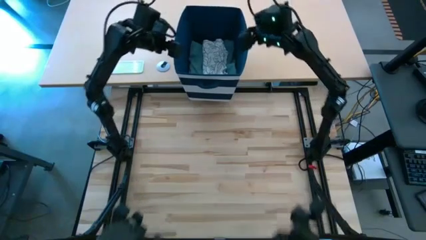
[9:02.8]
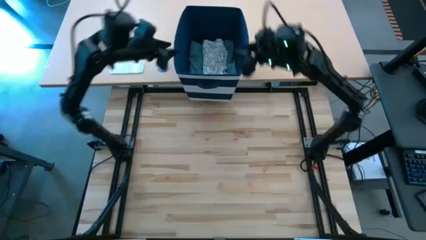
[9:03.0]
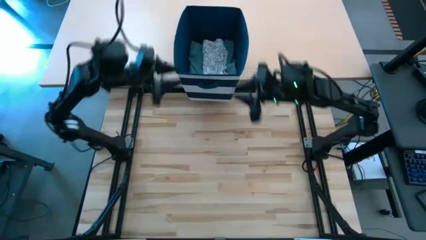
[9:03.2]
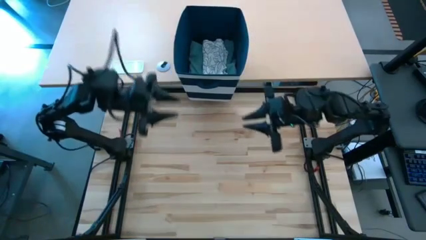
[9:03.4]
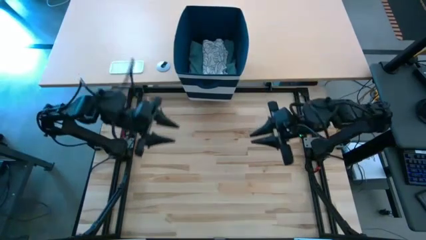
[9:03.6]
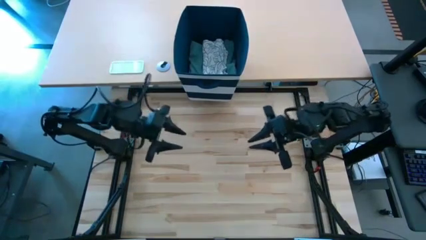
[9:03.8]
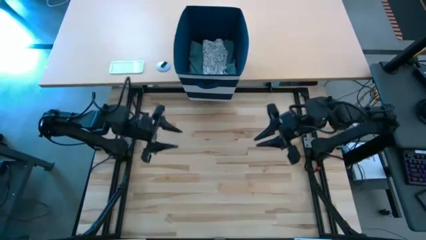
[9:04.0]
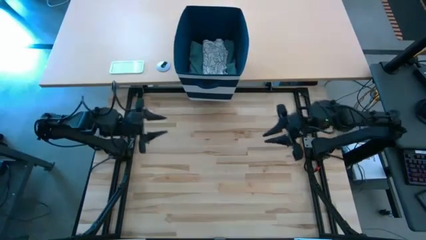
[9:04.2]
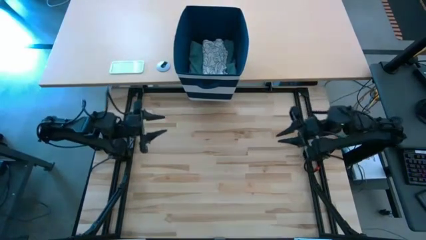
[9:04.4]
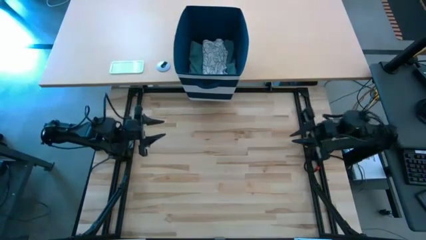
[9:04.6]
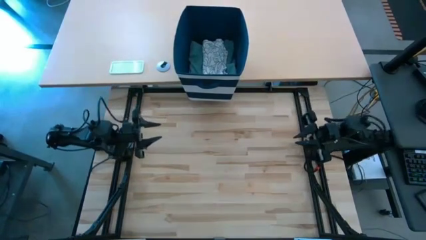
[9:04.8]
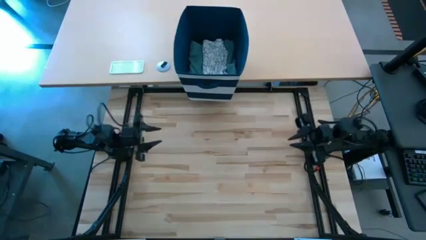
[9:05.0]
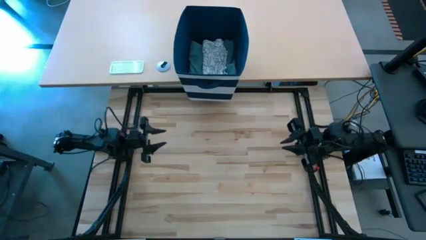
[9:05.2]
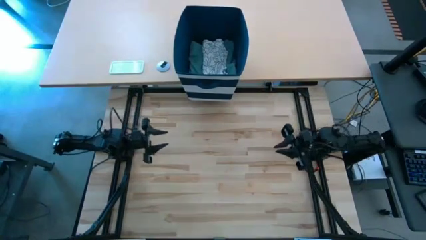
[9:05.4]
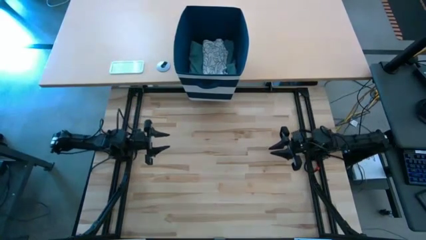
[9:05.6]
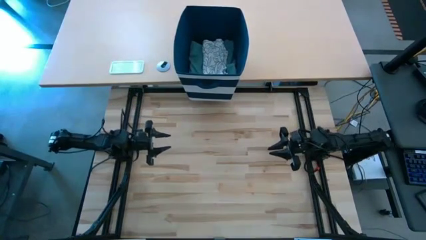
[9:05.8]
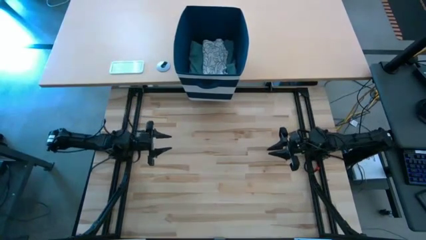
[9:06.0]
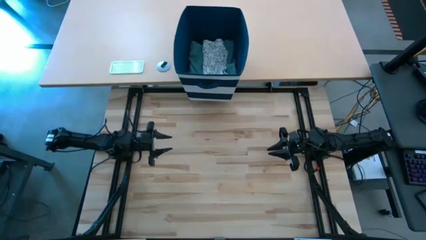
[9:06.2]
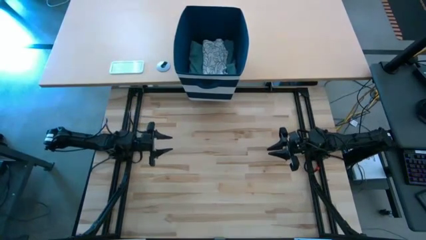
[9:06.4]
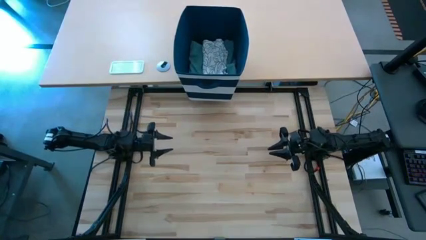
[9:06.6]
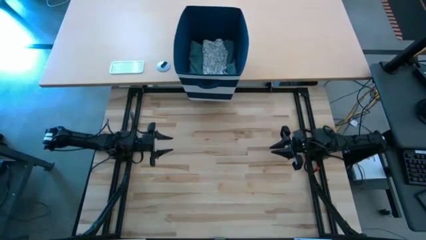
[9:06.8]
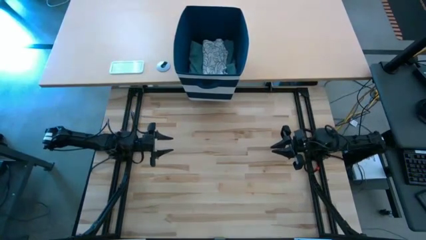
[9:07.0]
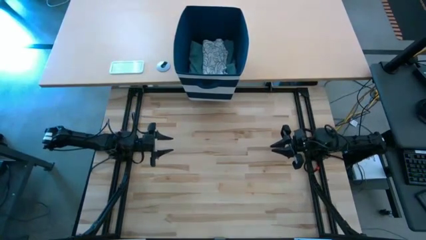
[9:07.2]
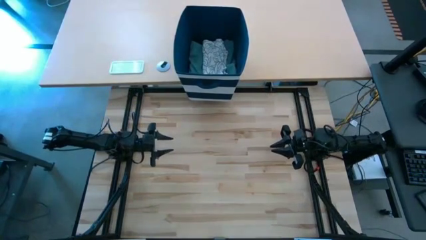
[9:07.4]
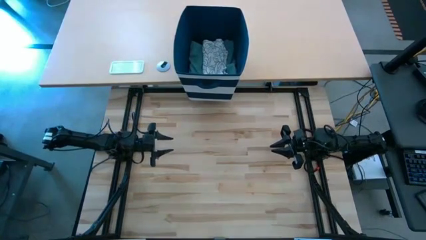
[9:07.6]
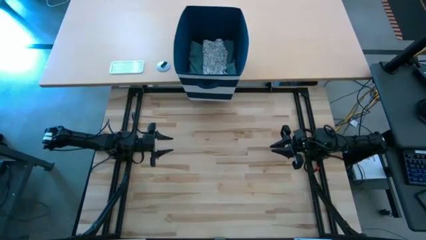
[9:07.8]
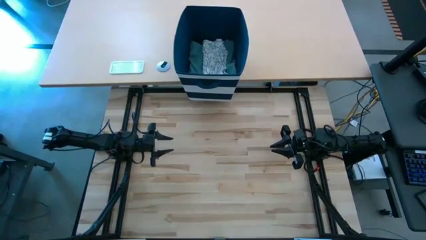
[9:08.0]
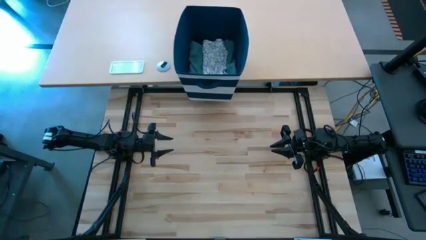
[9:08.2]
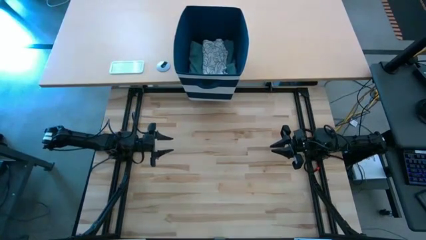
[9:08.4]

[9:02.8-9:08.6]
Task: Fold Laundry from Bin
Return to Home Position

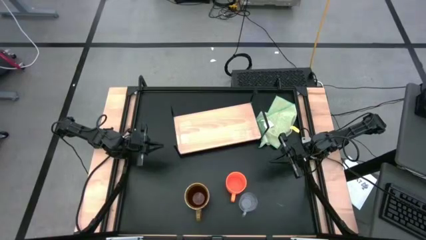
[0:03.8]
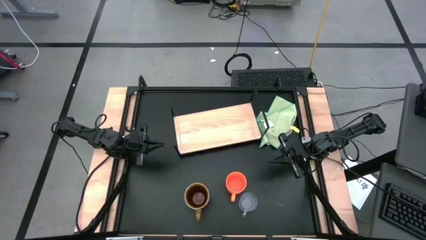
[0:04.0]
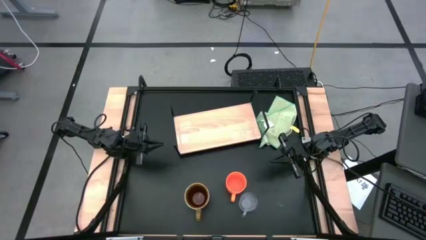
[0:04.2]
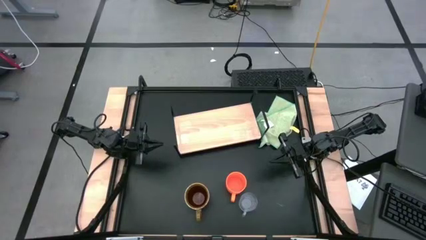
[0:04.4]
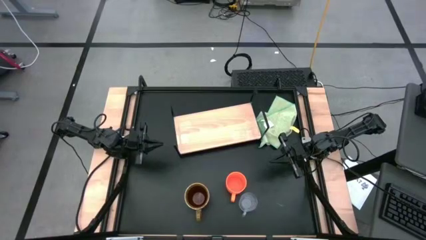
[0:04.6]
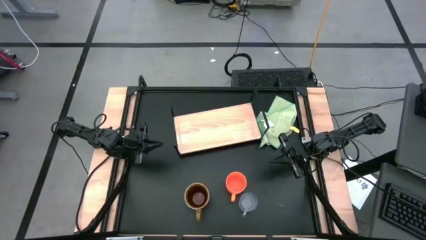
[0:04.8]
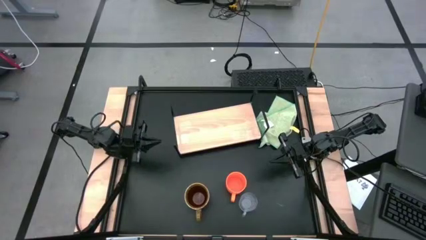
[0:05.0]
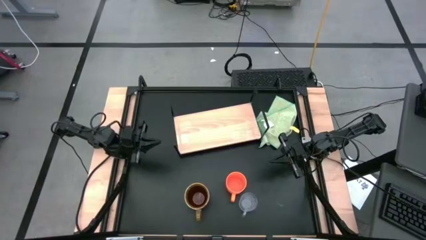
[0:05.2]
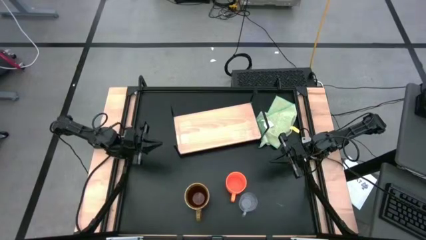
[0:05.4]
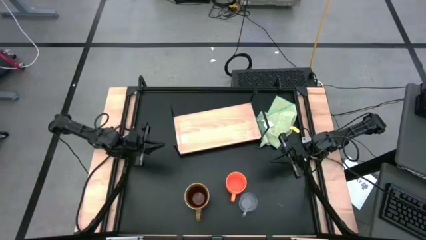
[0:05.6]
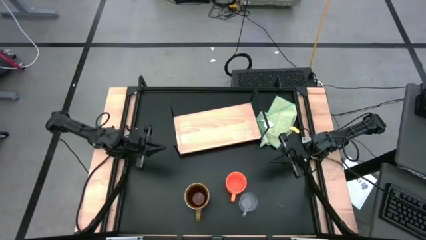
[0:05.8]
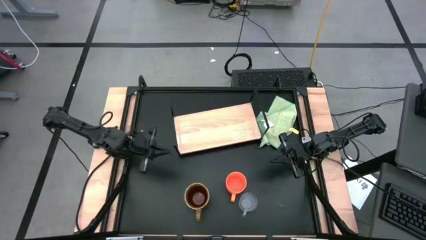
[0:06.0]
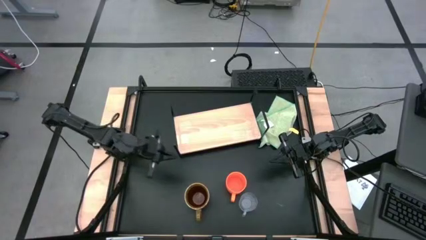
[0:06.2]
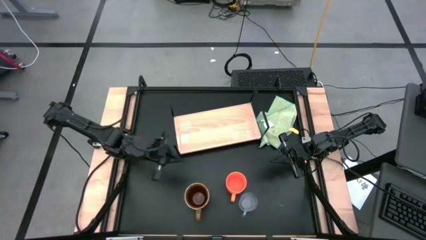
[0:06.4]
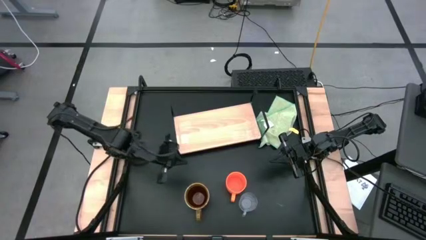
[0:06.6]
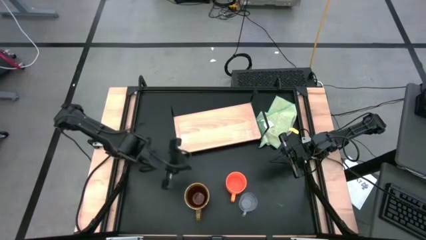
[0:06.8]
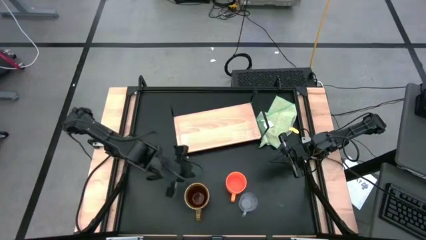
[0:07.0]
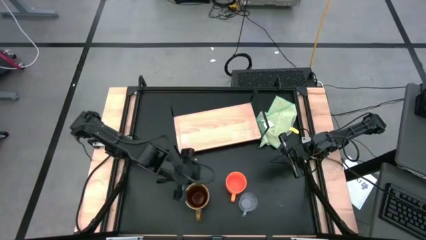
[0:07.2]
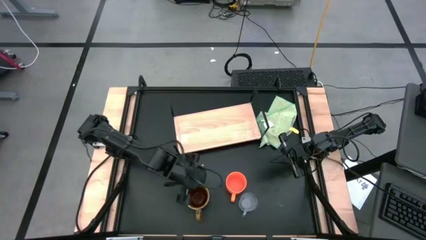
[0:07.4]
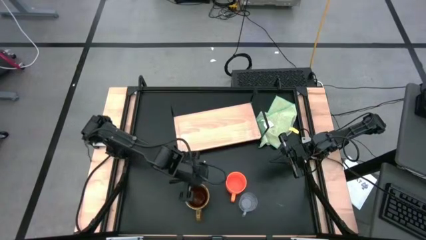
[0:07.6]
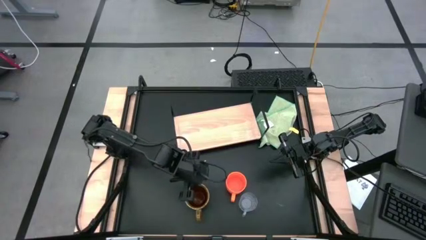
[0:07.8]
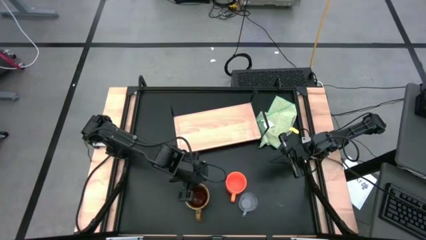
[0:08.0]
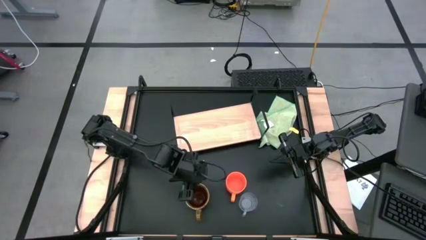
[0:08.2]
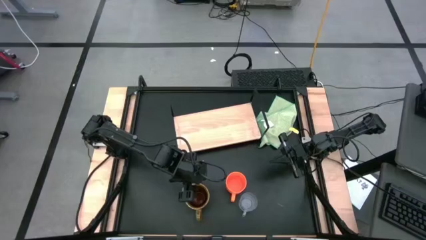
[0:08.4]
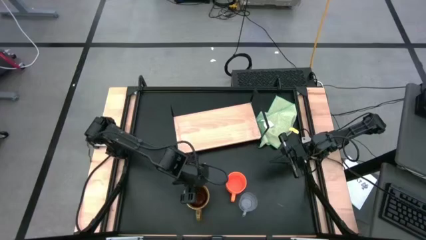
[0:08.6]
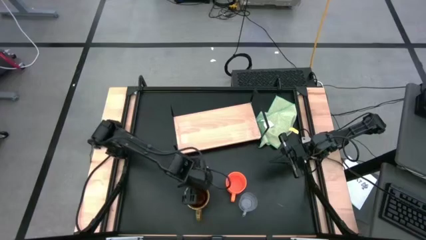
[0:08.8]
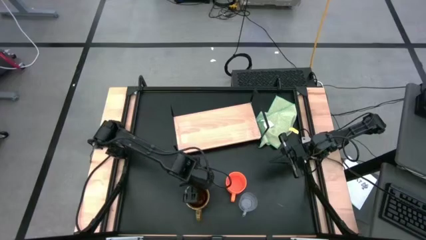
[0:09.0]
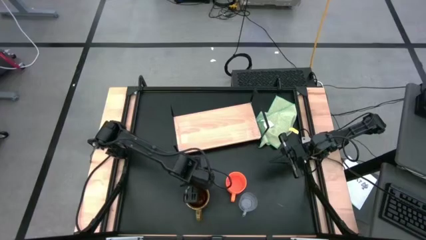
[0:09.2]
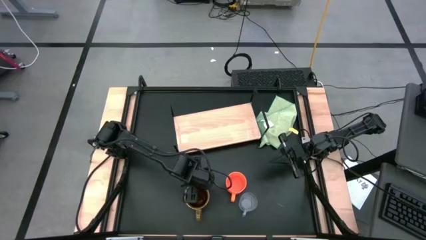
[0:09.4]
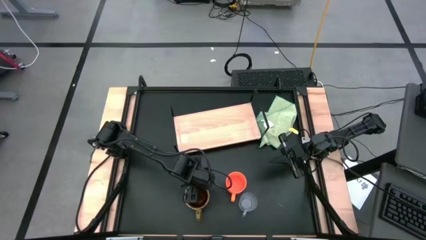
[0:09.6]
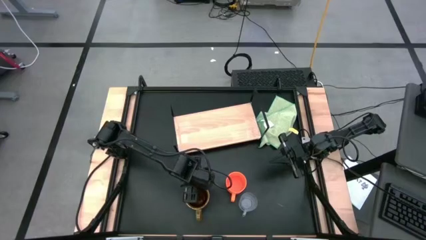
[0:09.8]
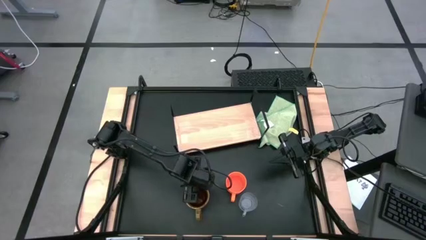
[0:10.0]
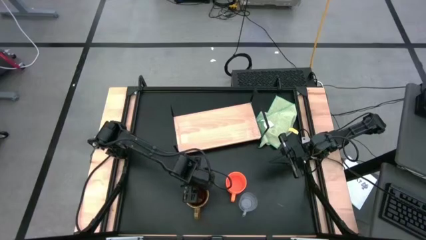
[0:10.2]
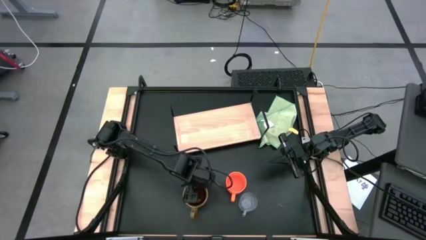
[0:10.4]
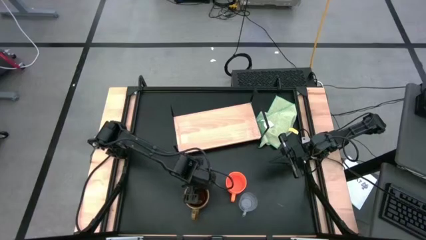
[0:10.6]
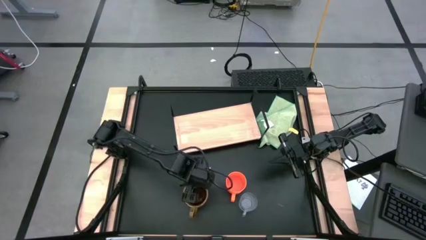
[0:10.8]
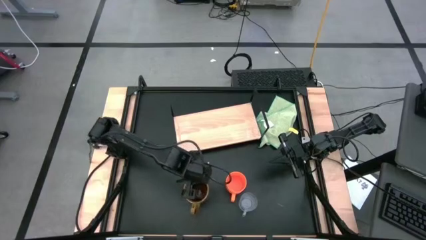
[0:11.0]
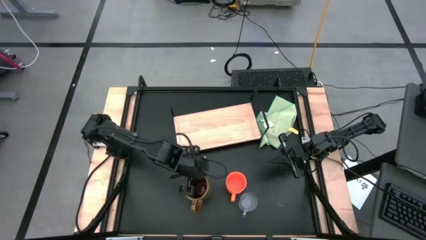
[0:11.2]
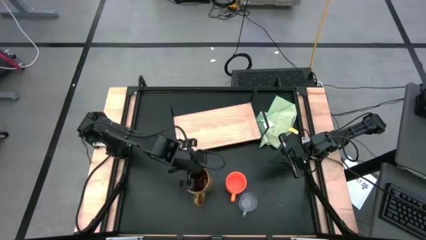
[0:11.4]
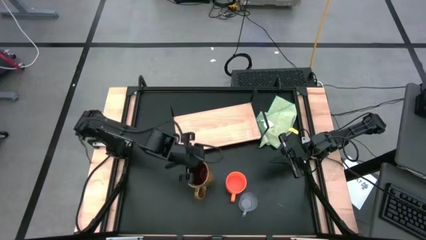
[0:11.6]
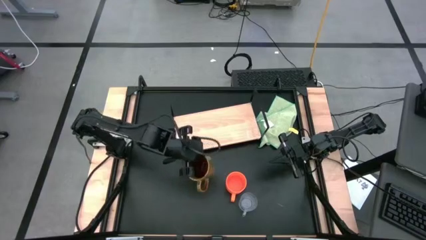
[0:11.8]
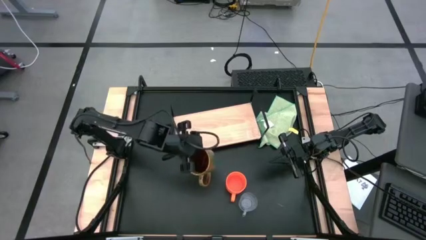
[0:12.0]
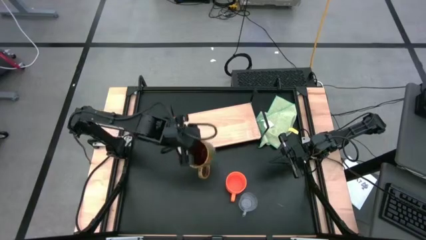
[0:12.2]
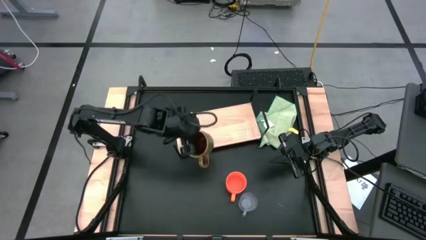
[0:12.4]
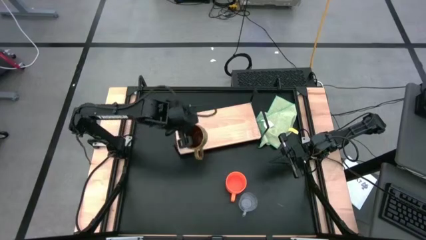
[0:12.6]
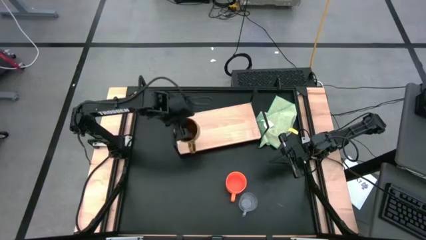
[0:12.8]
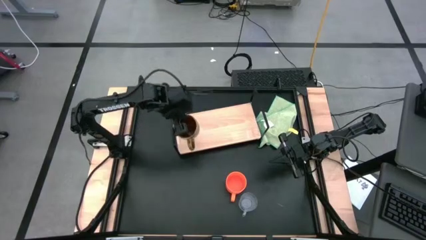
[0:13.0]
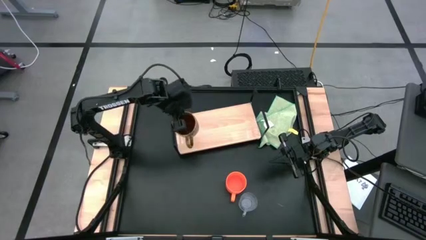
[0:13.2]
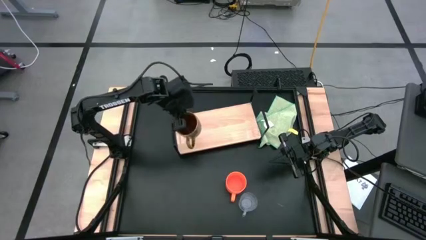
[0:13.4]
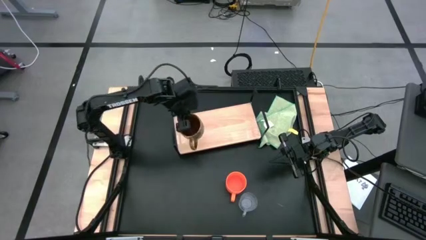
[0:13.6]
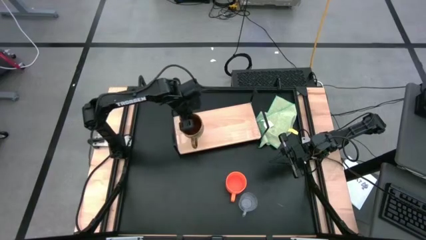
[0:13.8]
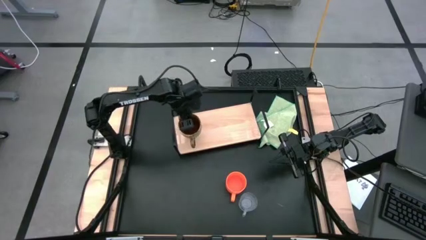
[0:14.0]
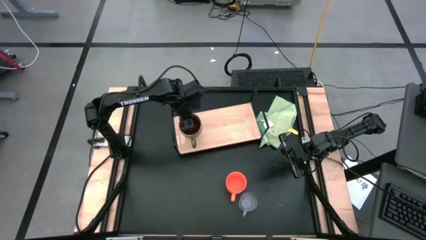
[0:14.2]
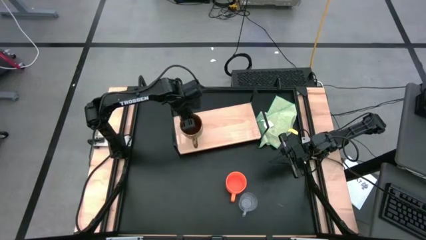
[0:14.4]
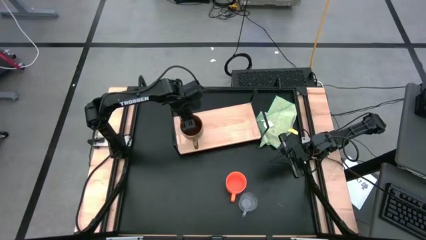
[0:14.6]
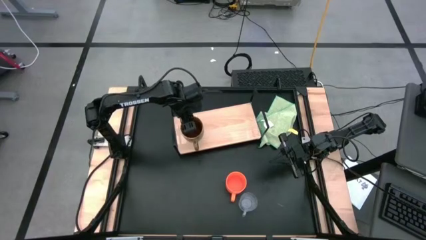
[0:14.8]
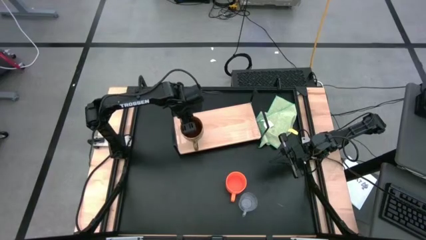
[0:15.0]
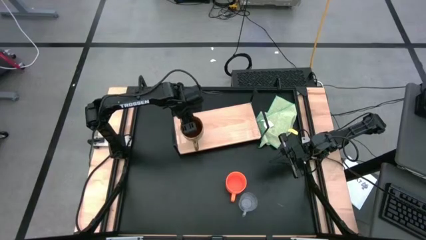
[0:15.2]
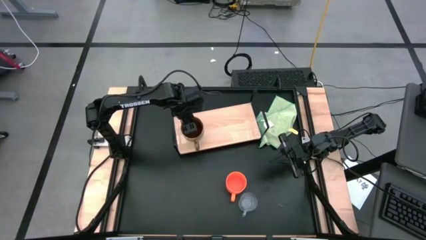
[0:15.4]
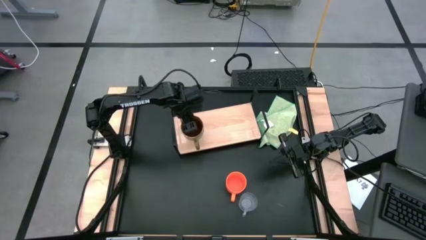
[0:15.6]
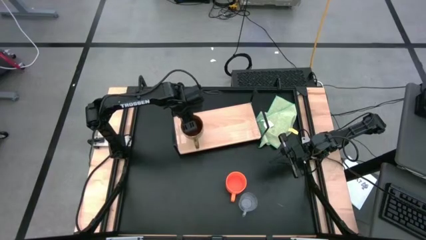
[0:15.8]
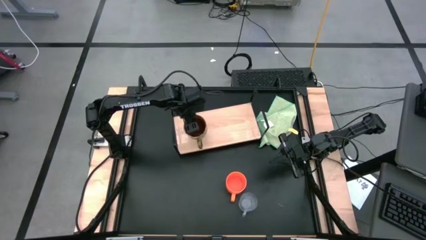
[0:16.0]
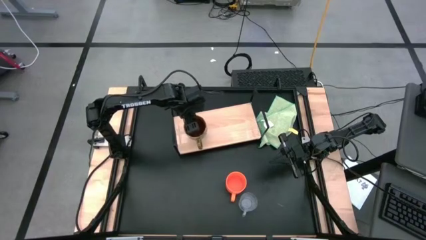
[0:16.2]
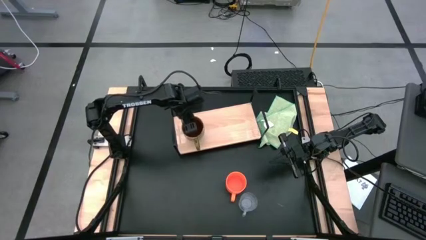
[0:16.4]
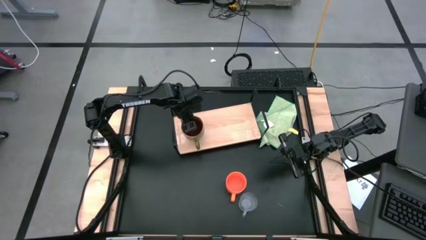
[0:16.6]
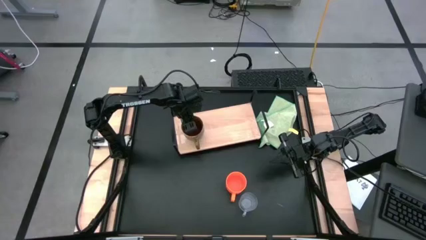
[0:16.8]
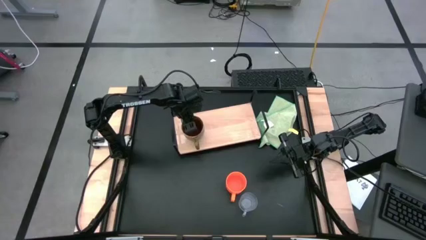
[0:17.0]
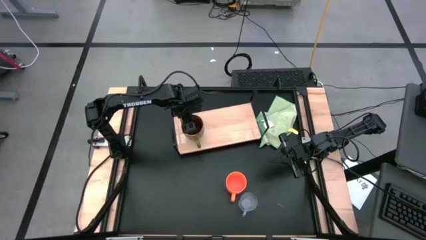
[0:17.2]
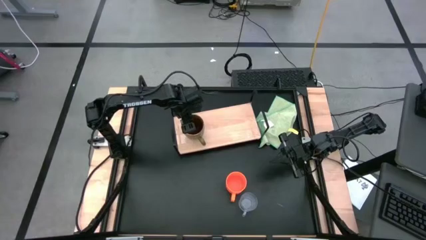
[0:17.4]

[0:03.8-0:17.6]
Task: Stack small to large cups/mugs on shelf
Put the dark green mug on the shelf
